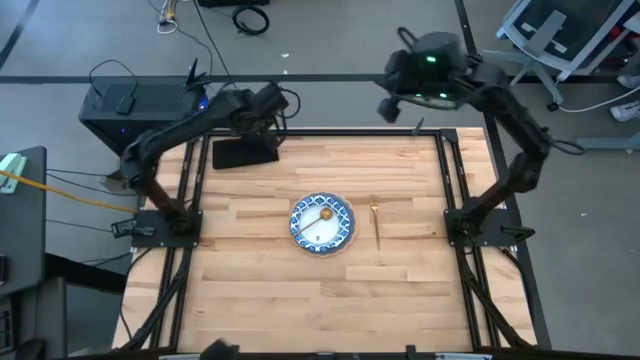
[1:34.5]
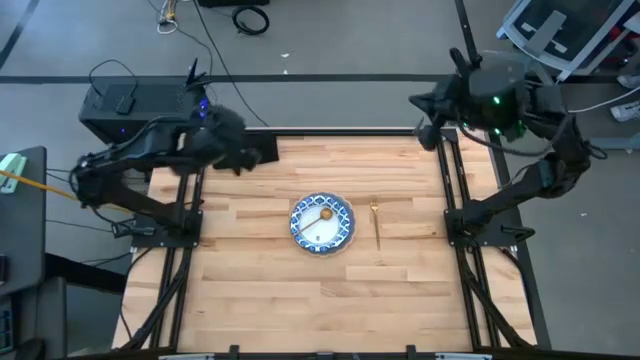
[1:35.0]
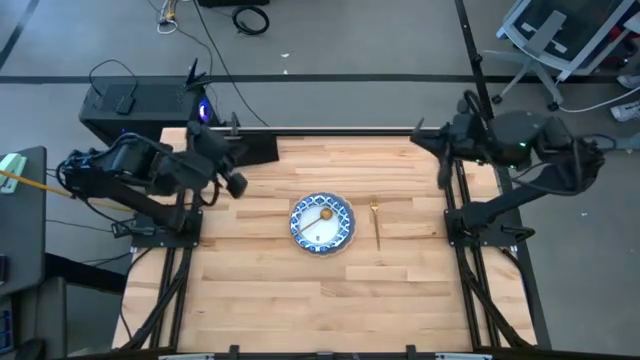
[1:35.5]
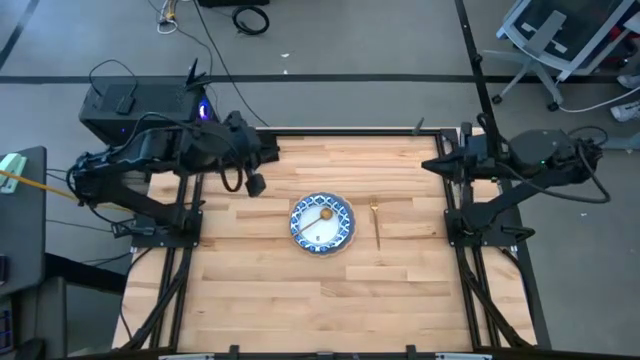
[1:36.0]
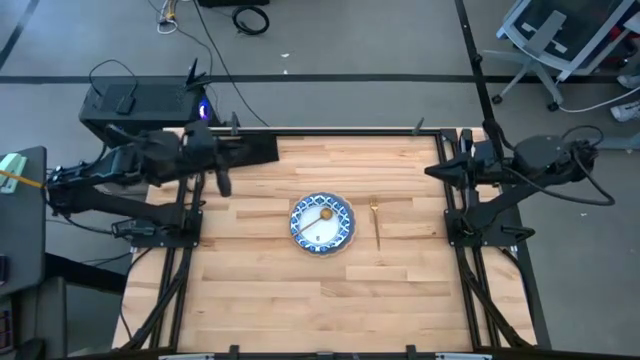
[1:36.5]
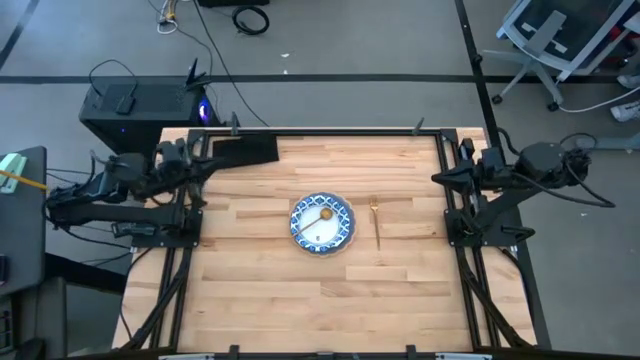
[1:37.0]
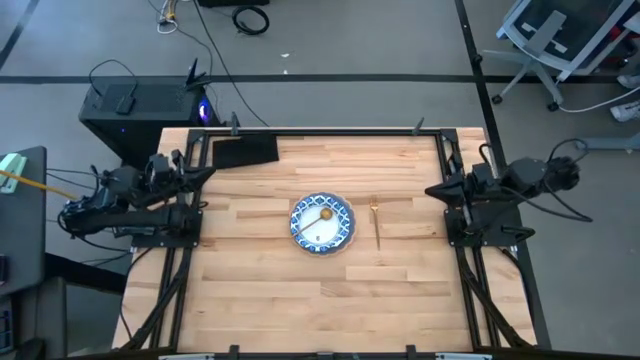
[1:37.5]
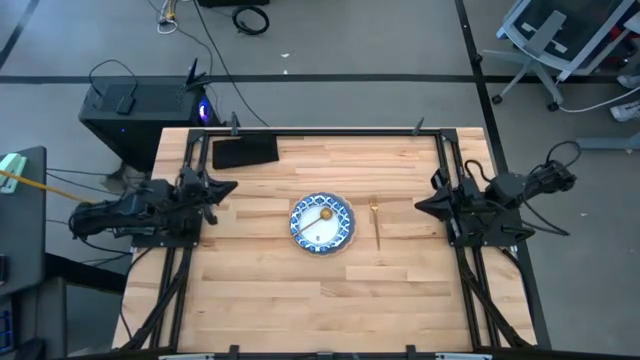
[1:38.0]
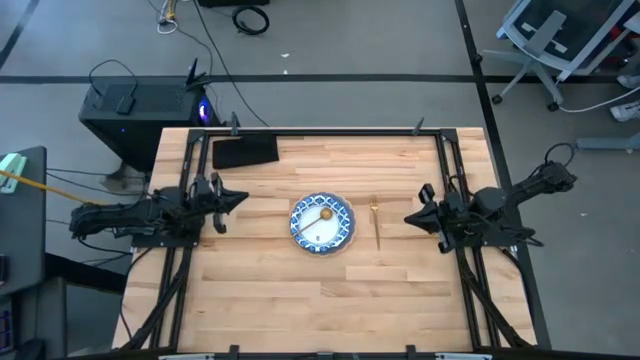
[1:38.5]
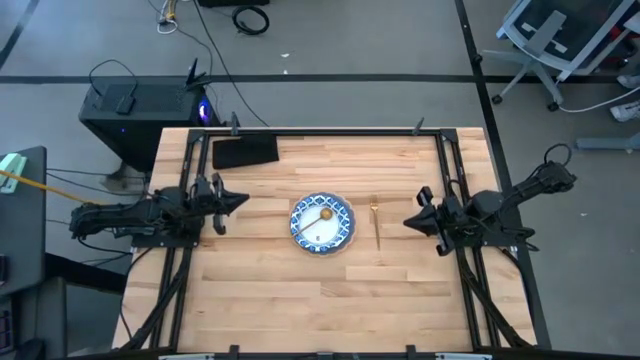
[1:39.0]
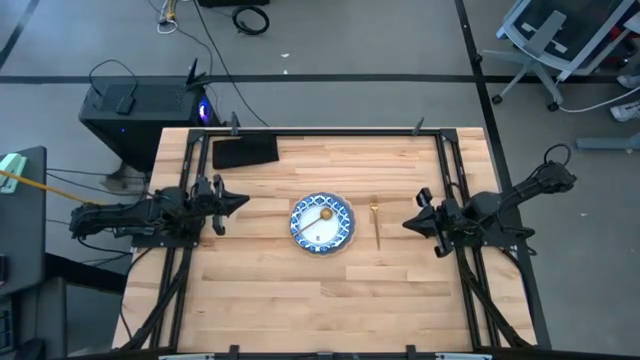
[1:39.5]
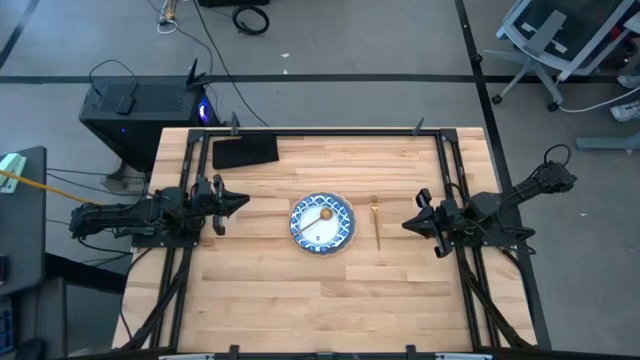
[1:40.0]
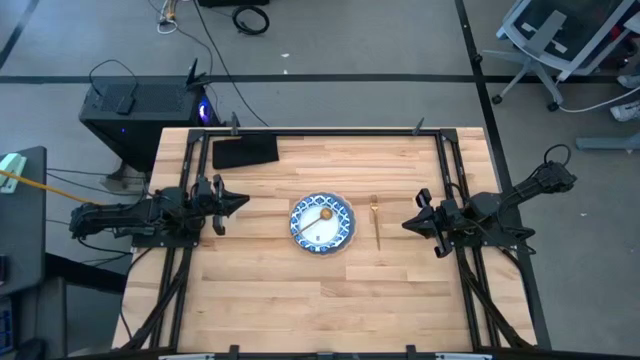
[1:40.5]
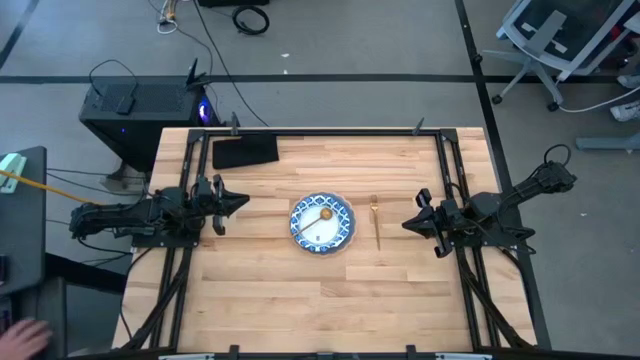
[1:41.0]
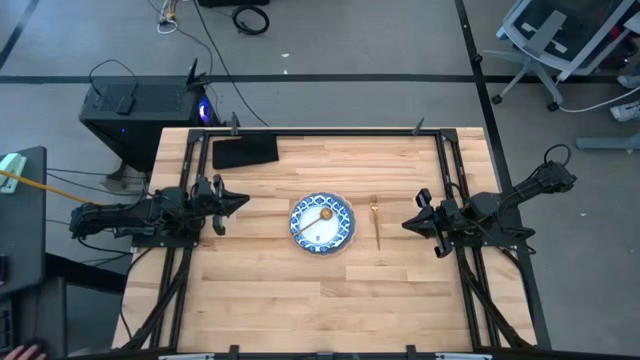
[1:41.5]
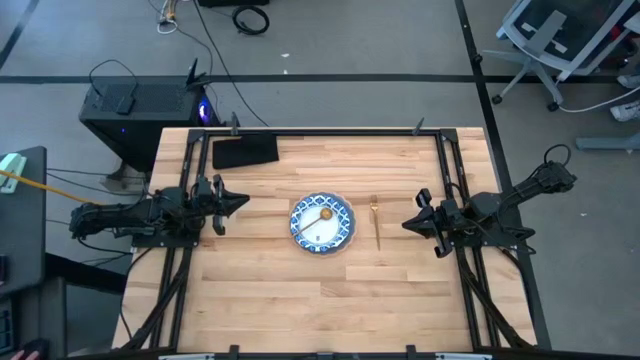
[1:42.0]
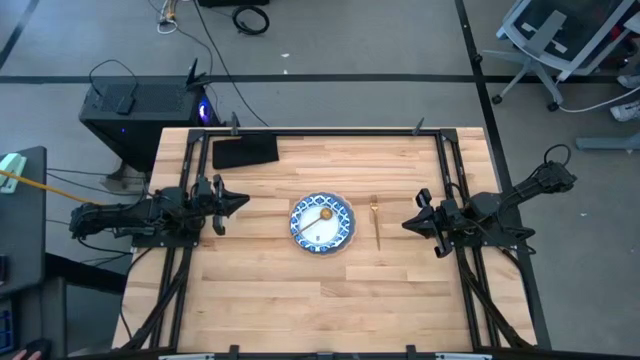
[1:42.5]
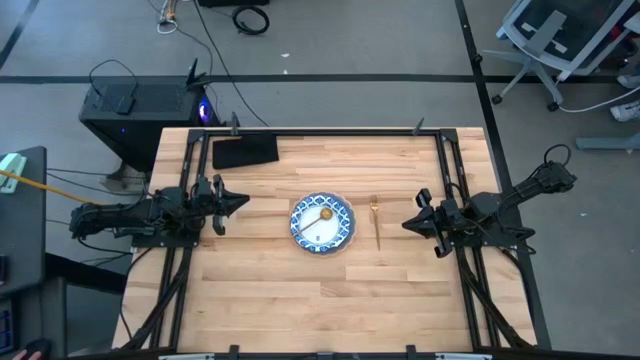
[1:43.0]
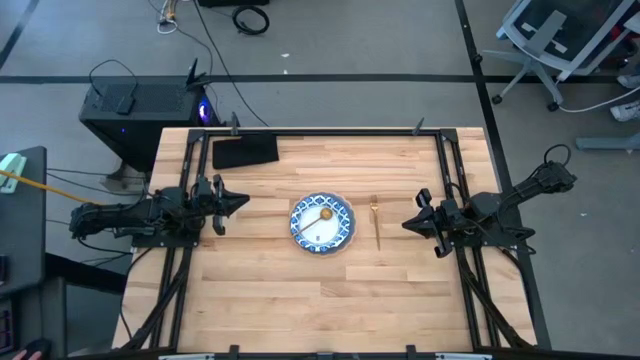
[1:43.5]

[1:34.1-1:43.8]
Task: Set table place
Return to Home Position

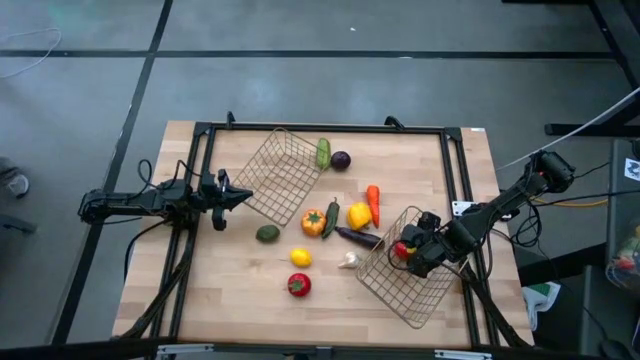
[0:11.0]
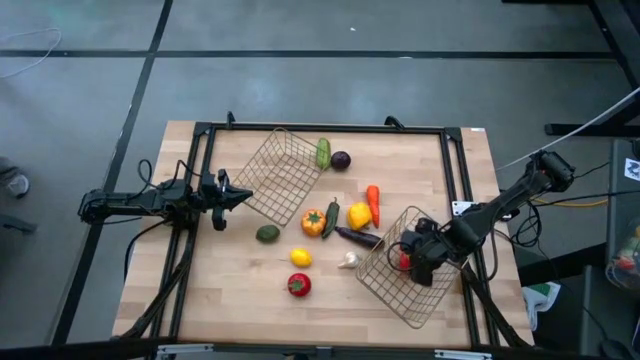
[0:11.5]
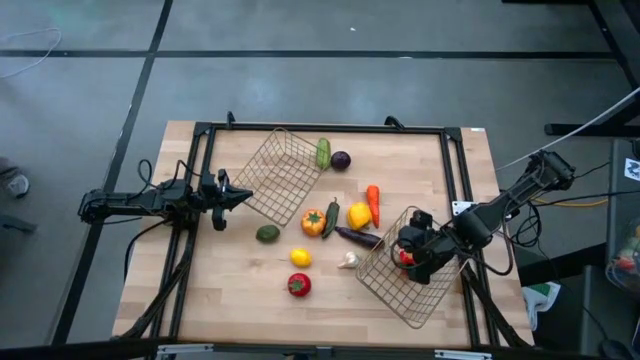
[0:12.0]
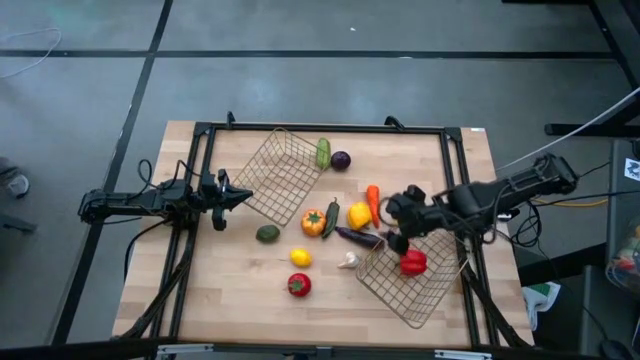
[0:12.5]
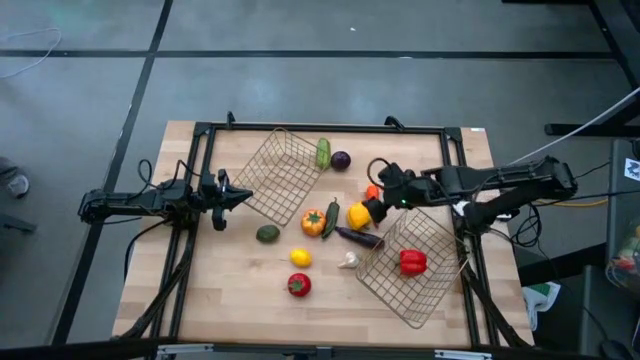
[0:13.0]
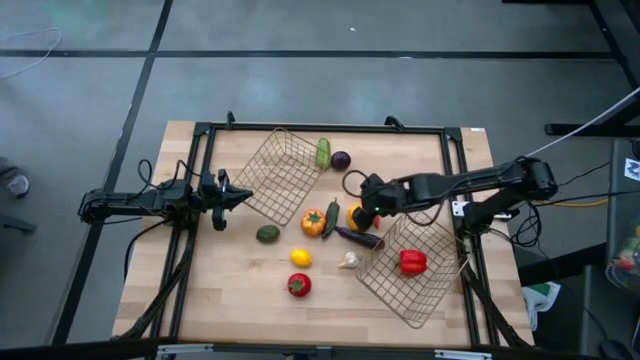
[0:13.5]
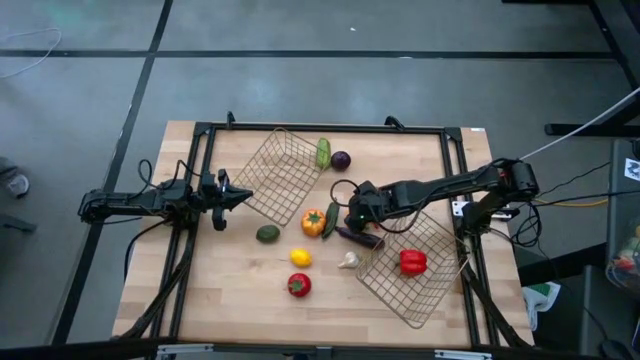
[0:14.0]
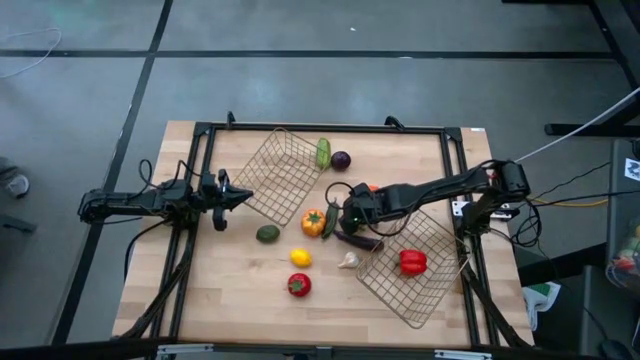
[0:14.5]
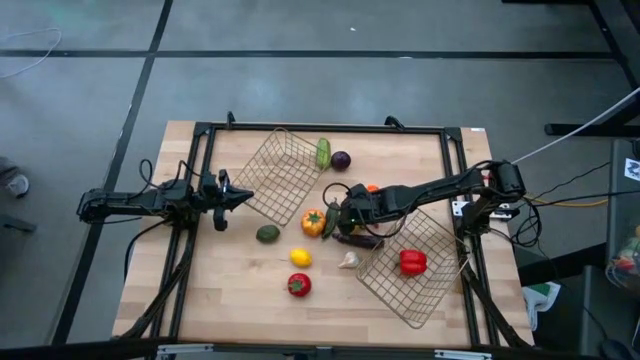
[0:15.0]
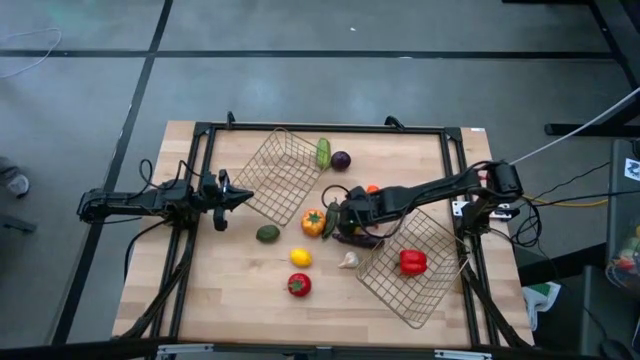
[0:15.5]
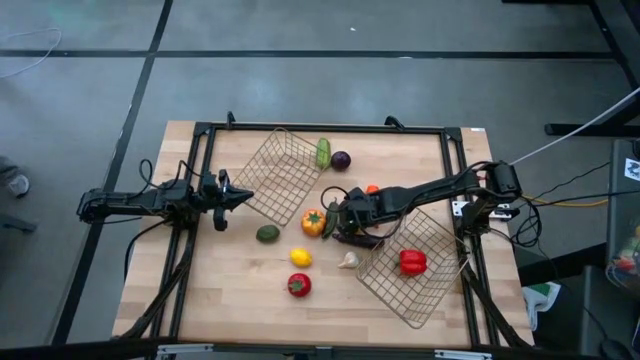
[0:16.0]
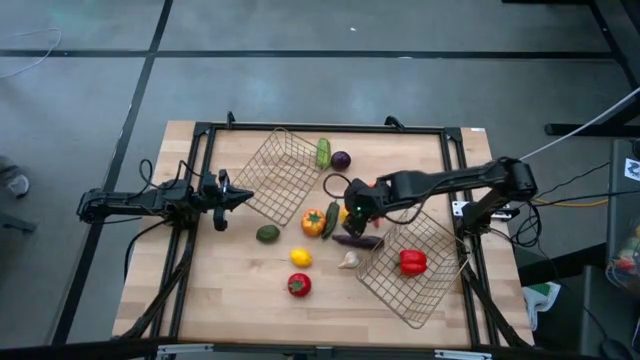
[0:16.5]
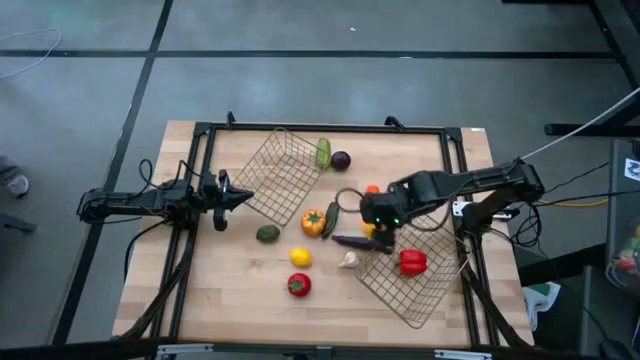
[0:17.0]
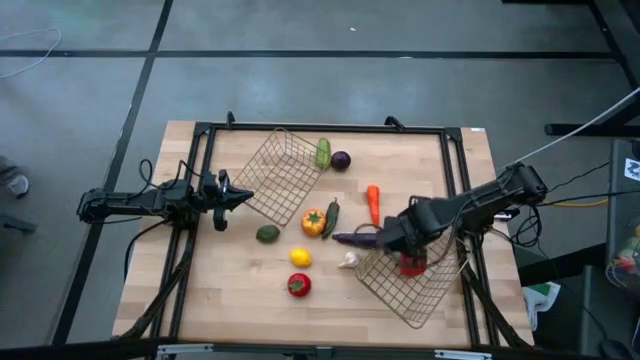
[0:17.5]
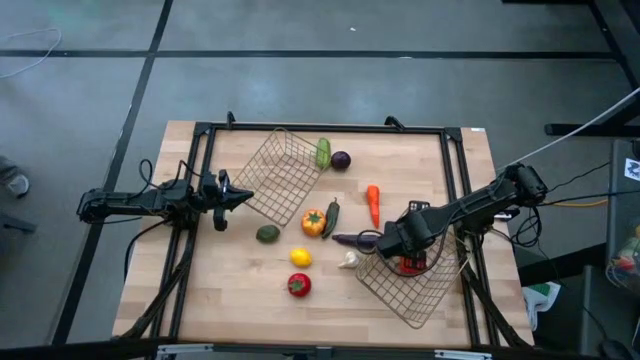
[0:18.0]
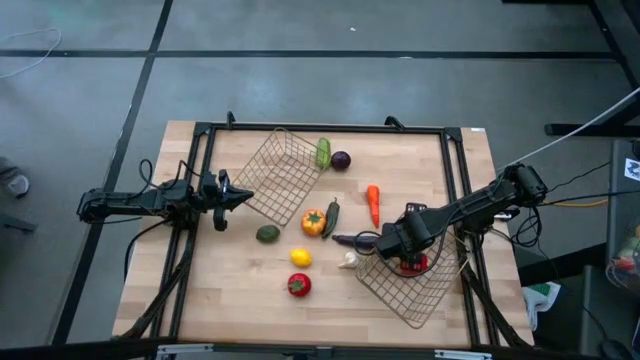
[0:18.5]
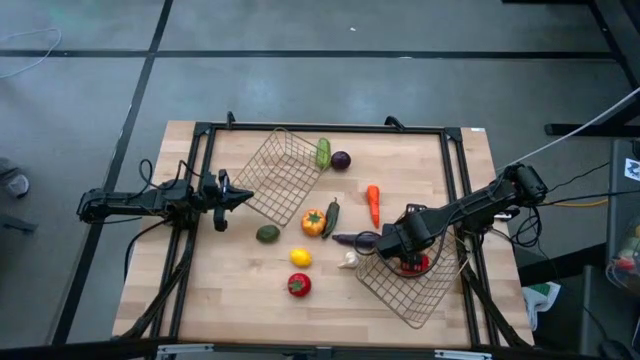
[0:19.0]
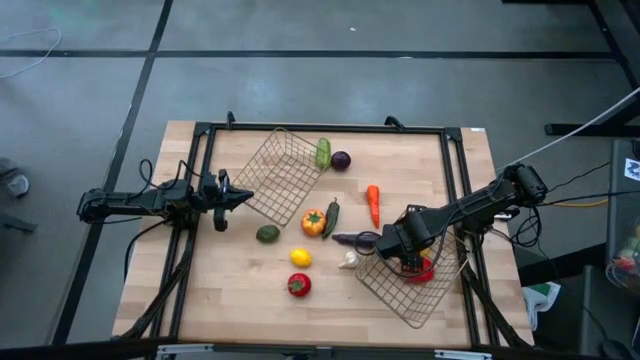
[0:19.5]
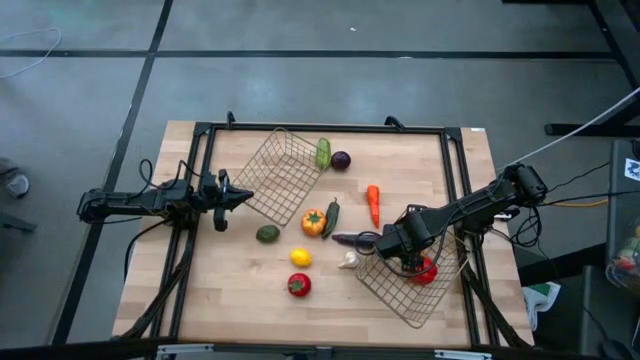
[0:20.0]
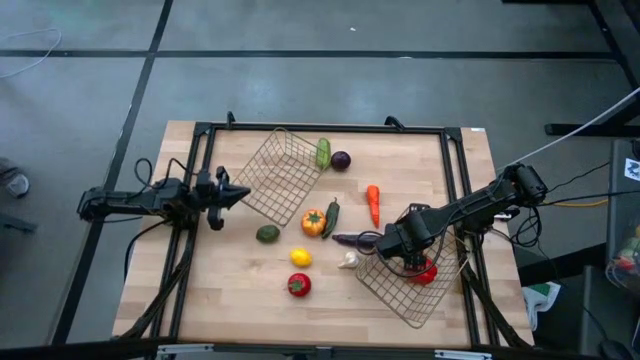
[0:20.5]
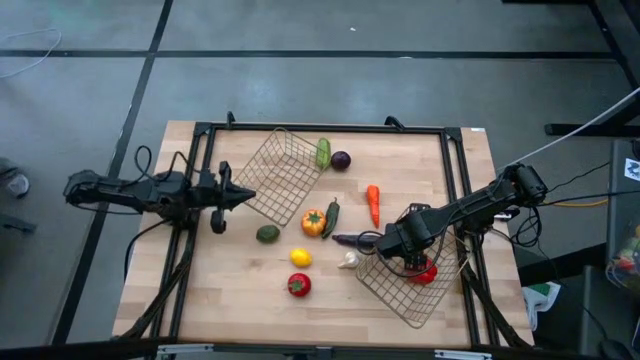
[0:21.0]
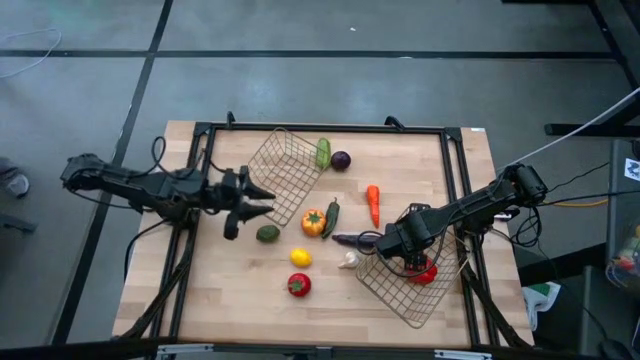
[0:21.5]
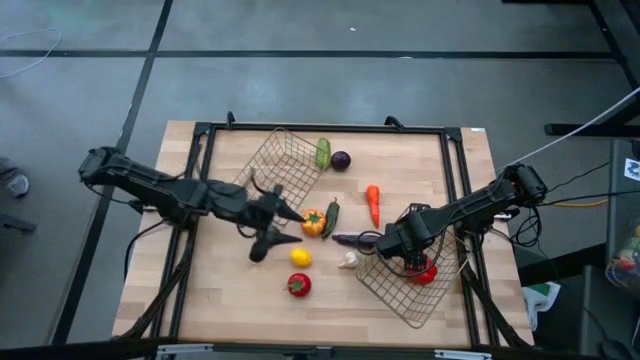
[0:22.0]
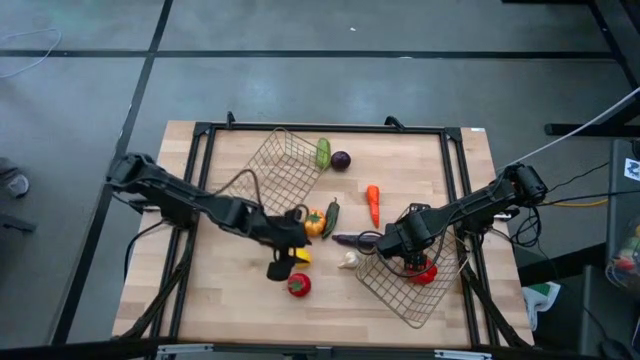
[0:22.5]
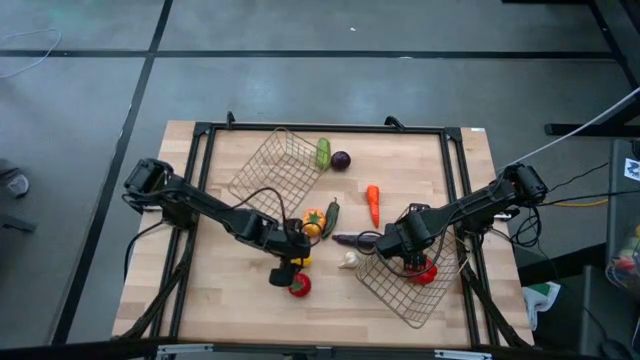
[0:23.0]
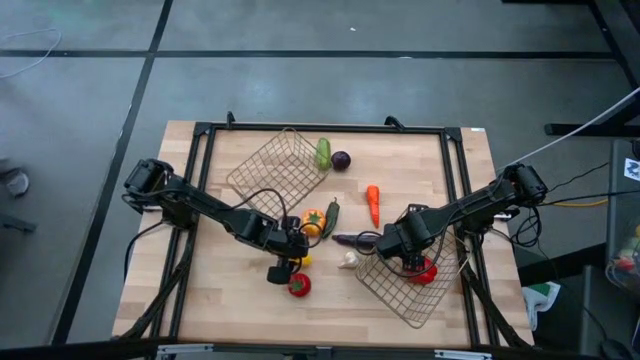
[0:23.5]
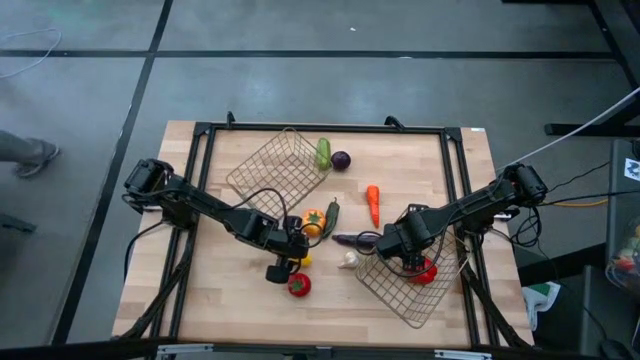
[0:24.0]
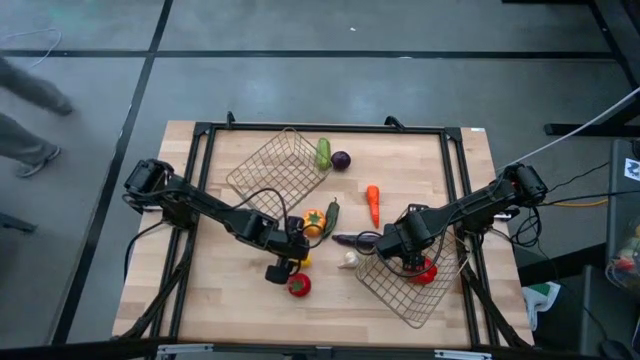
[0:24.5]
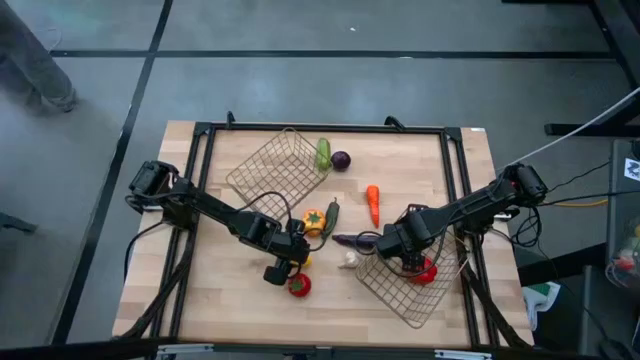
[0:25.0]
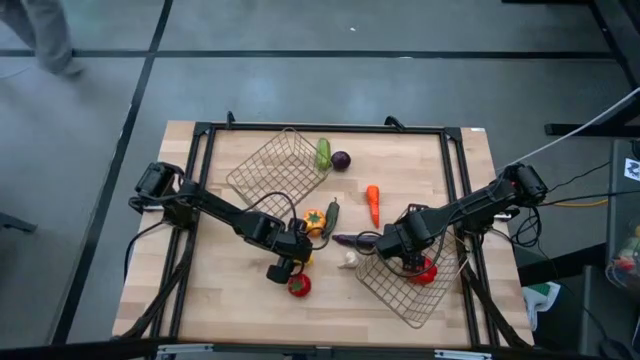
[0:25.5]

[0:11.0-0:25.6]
Task: Sort produce into baskets
Put the yellow bell pepper into the wire basket
